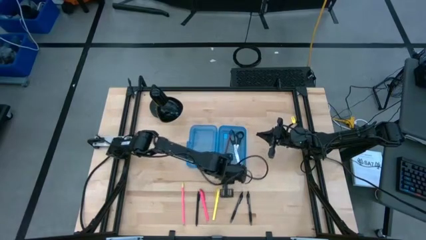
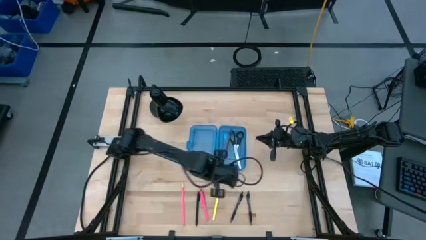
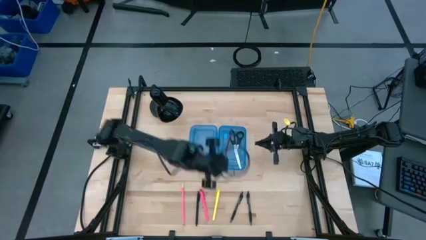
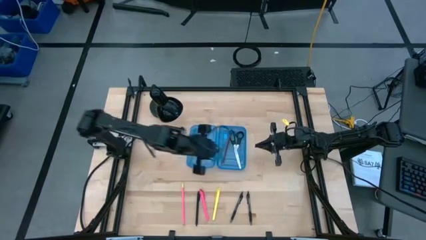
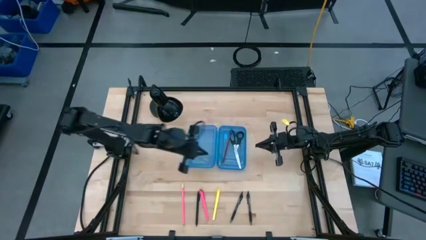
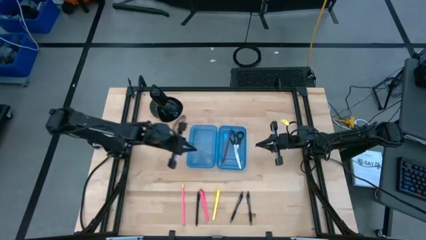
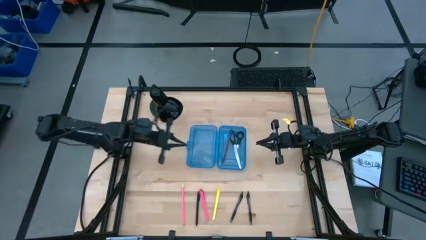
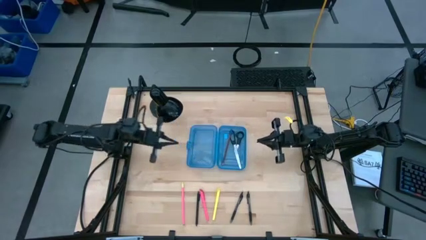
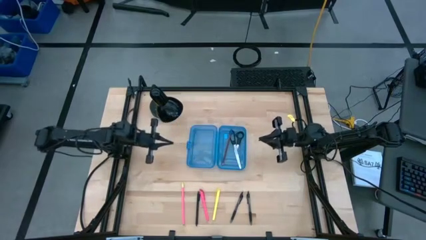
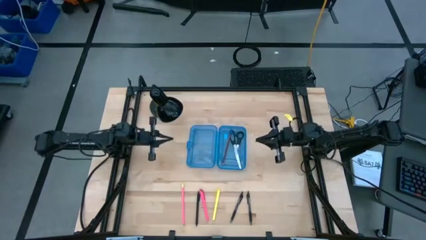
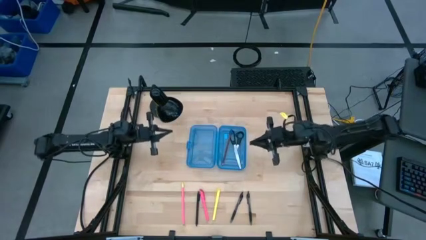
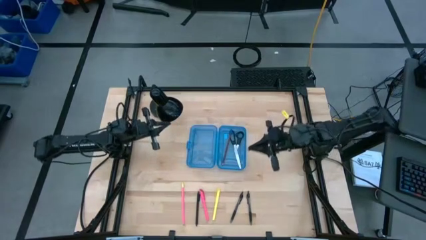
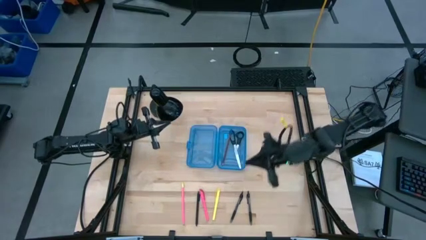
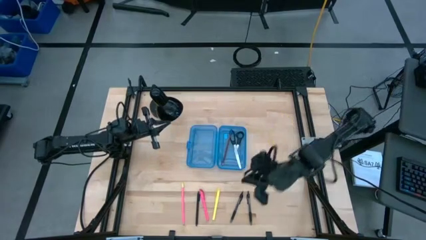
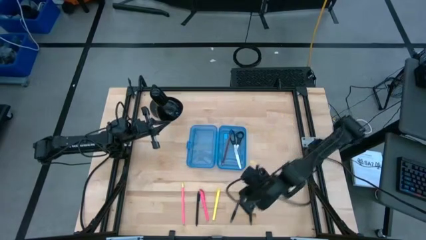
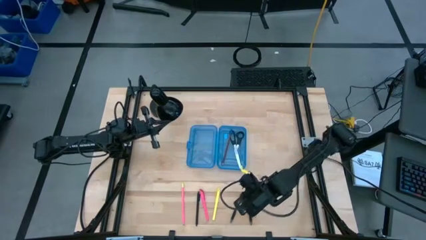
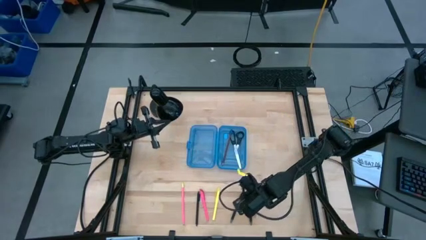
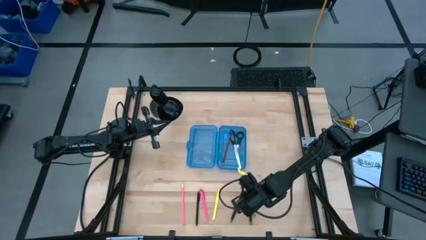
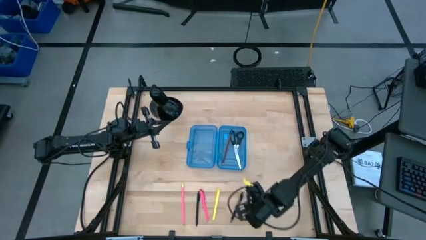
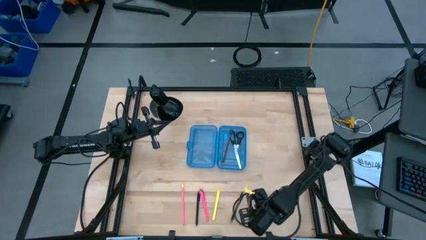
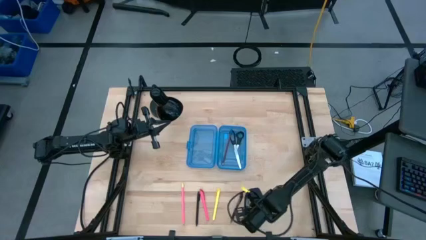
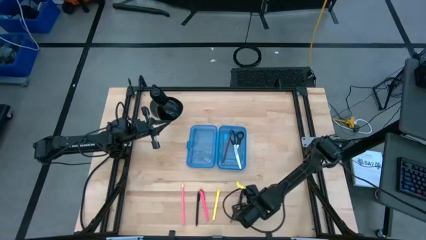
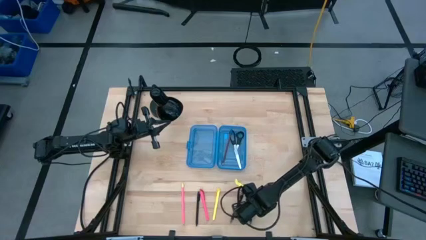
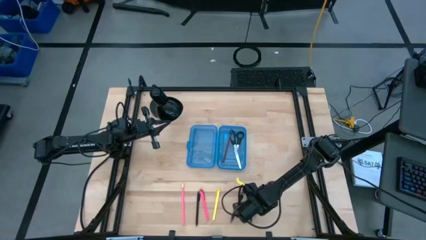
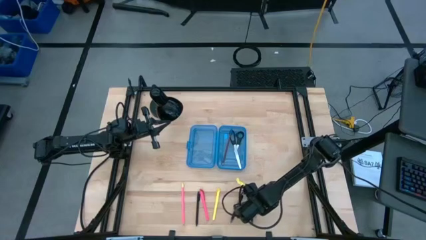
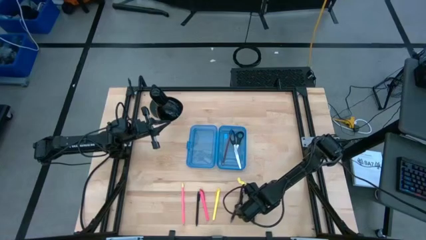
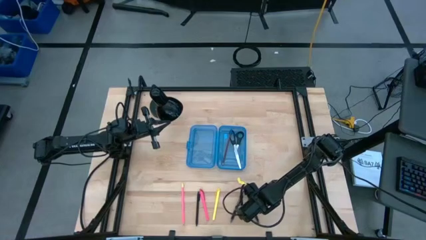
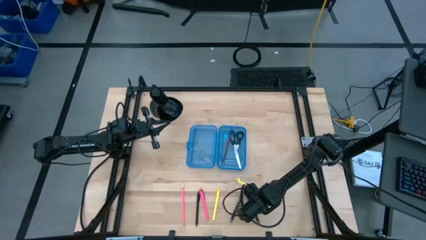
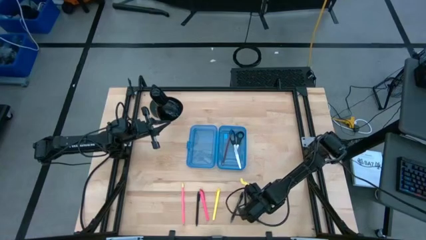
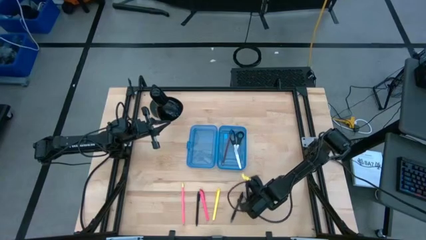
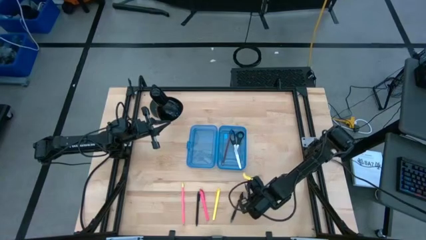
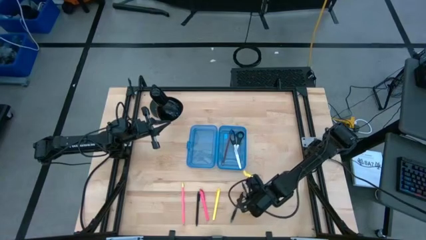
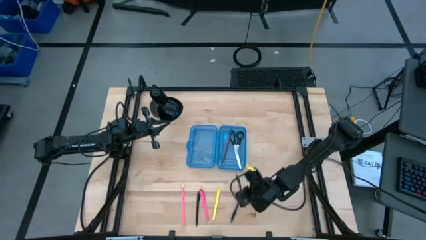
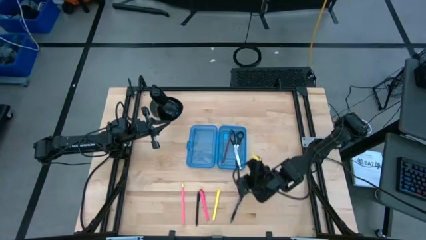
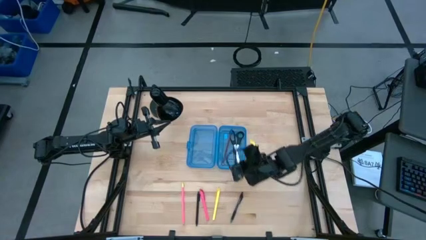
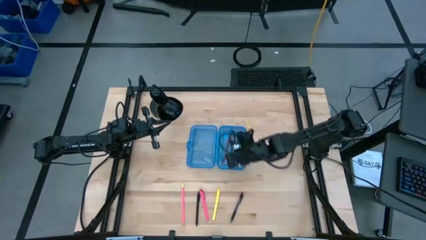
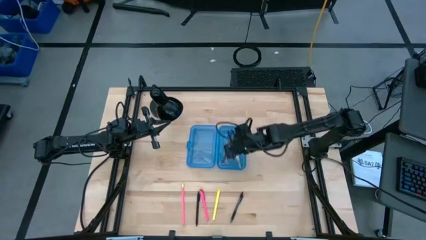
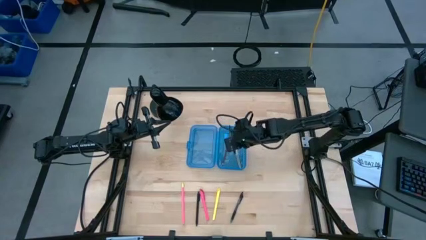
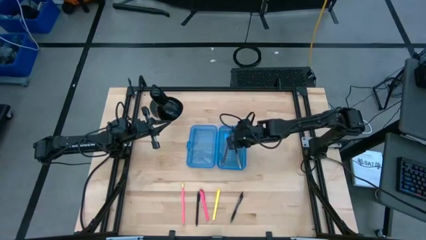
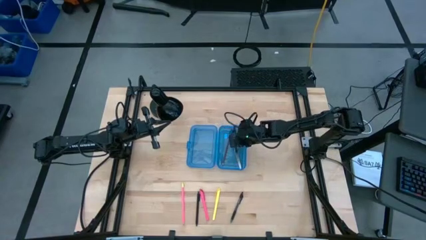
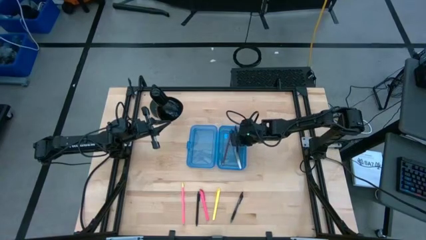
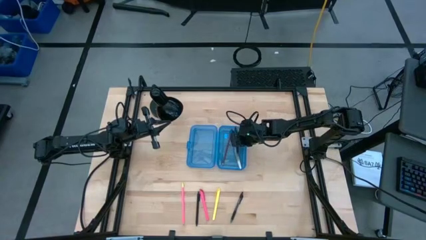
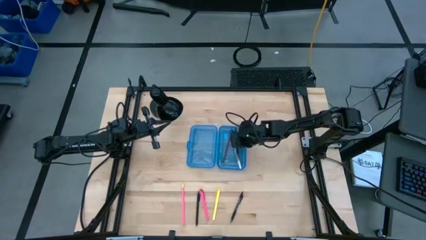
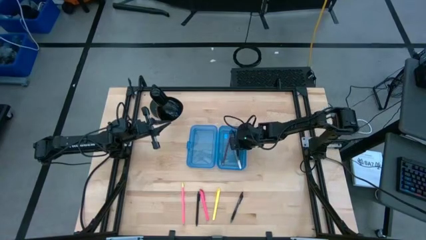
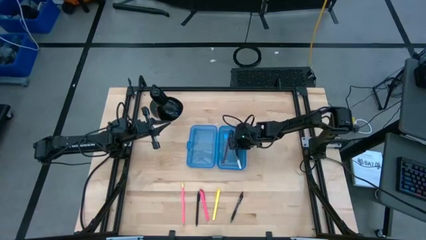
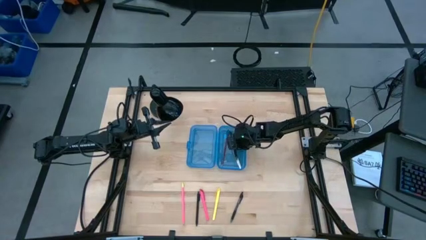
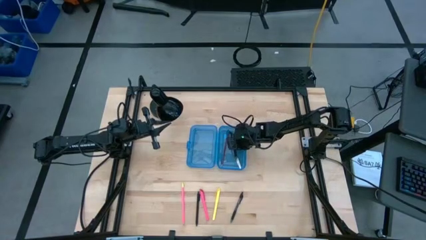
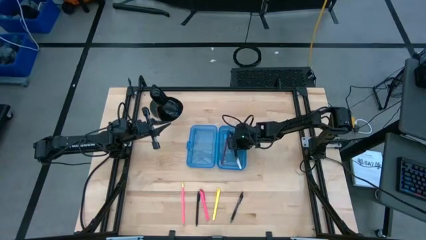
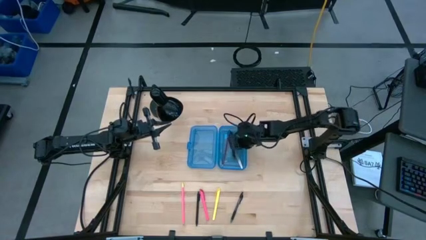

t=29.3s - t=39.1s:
Task: Pick & place school supplies into a supply box
Put the right black pen into the supply box

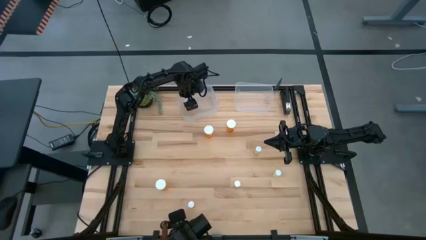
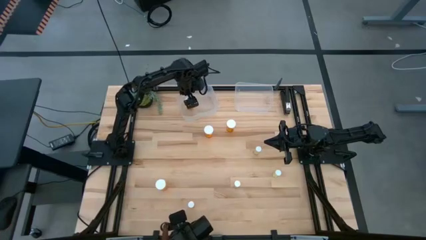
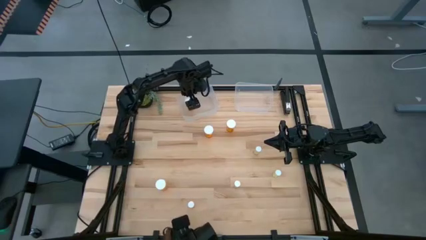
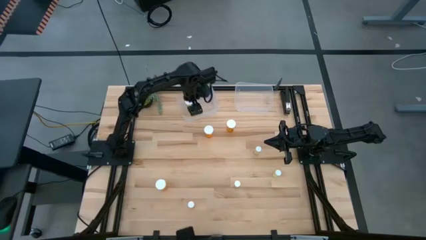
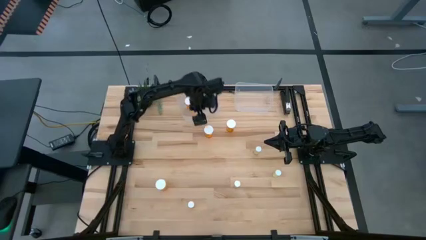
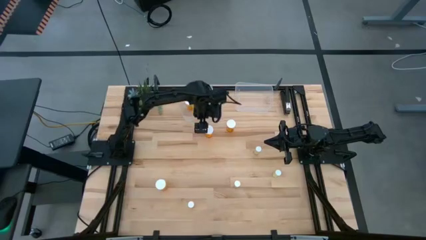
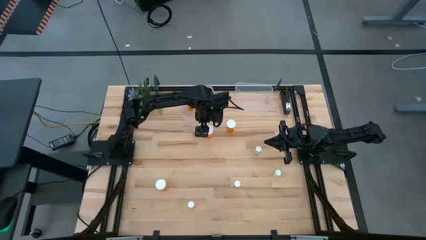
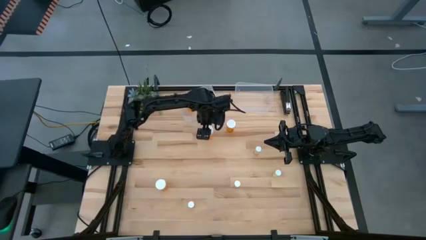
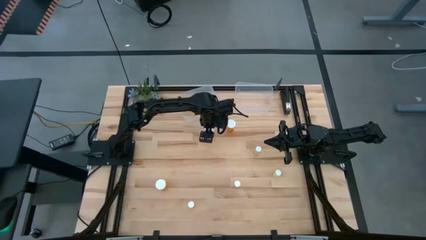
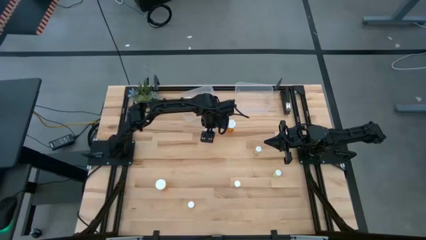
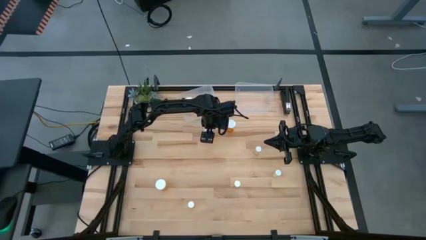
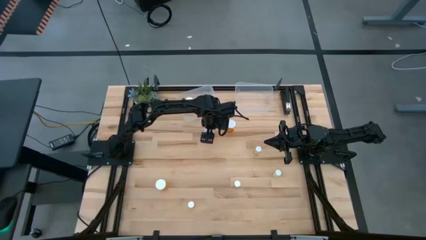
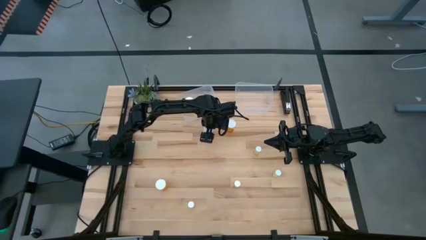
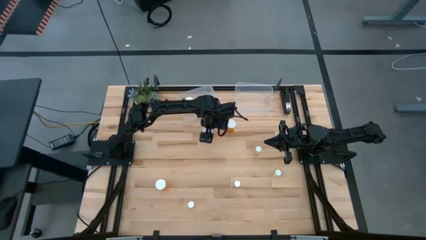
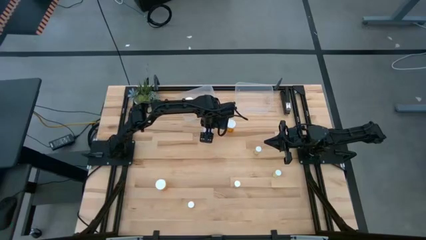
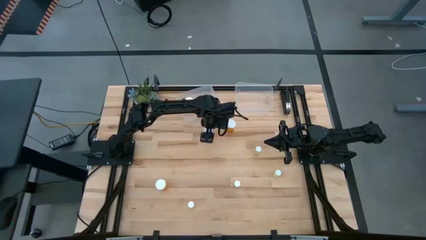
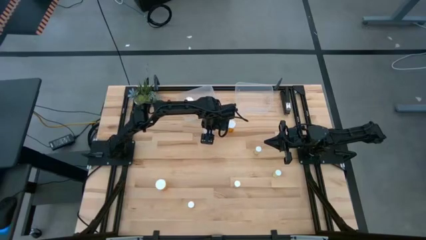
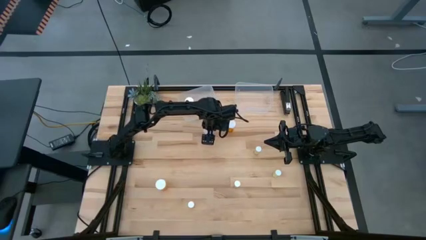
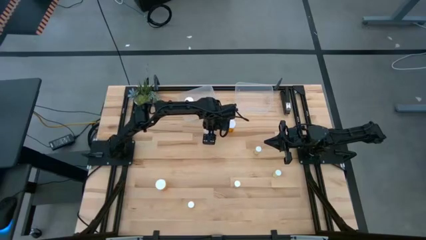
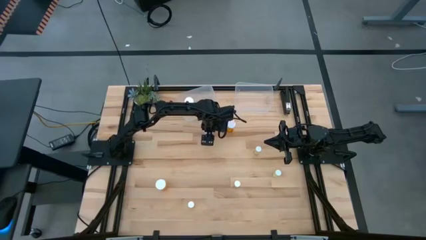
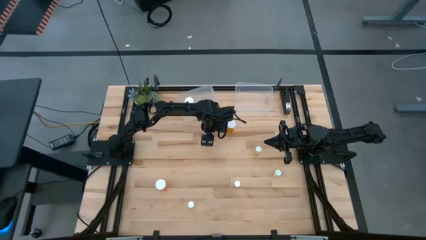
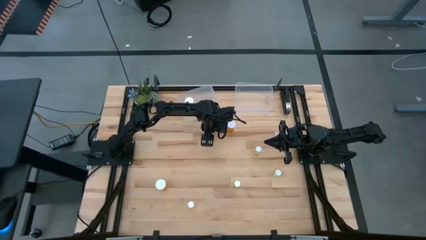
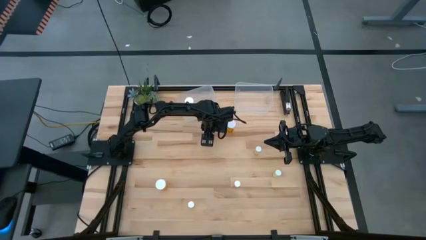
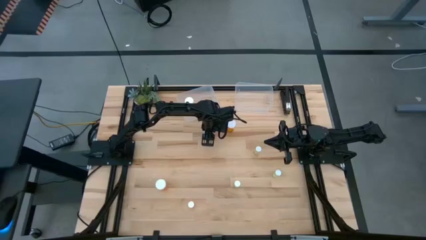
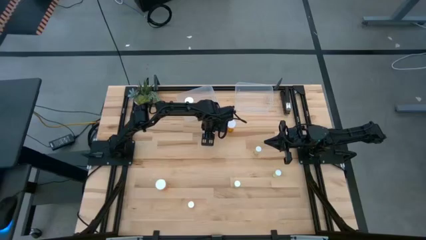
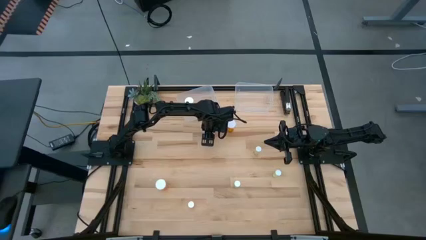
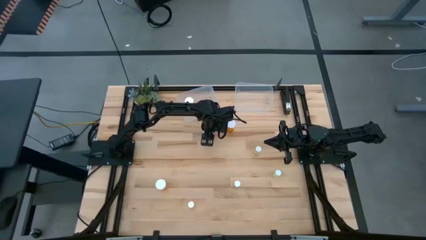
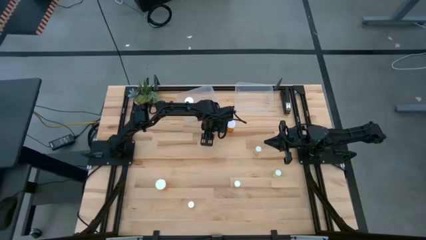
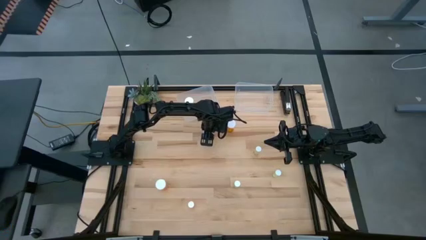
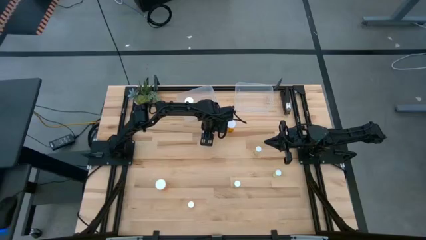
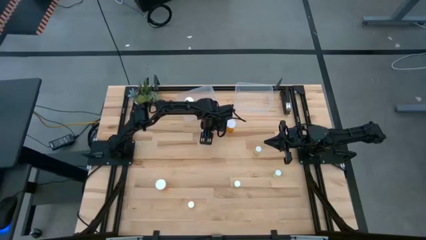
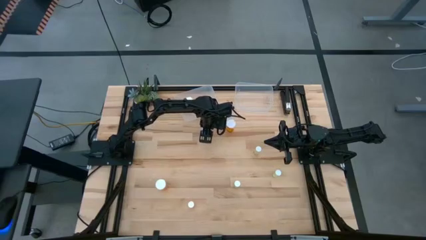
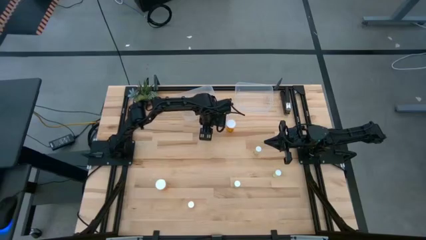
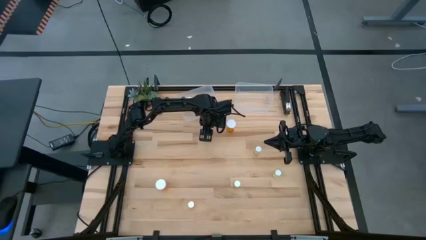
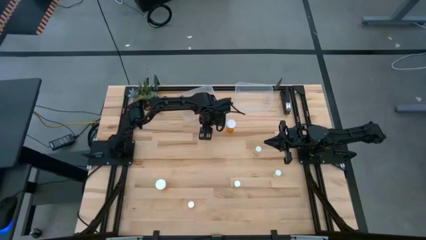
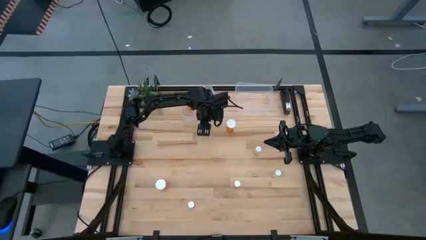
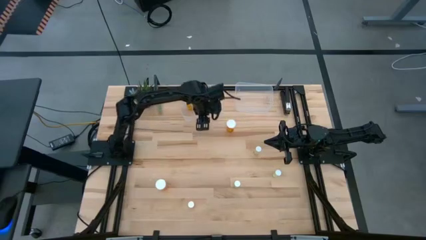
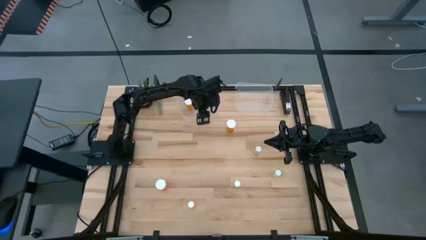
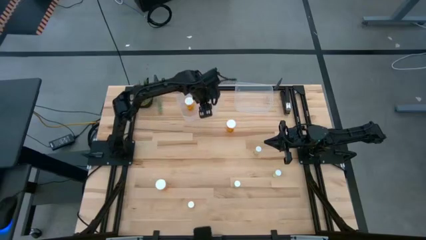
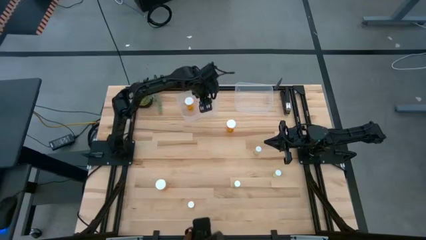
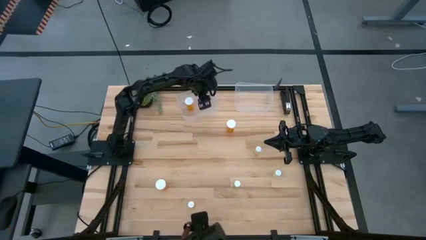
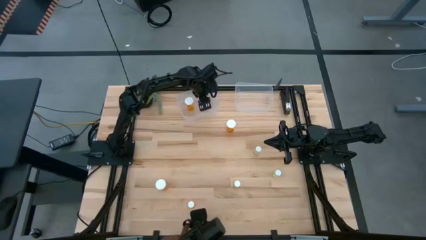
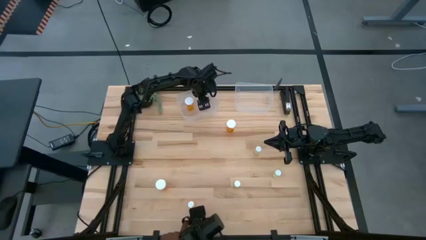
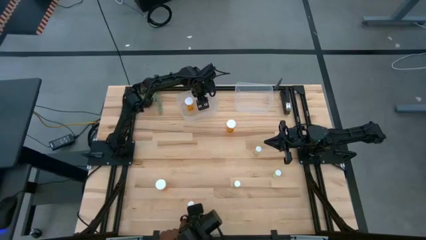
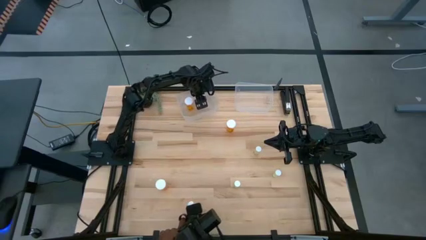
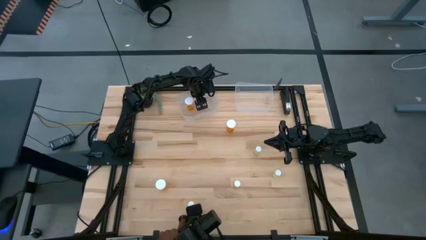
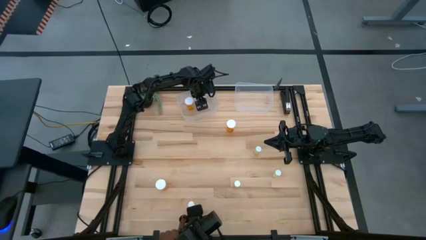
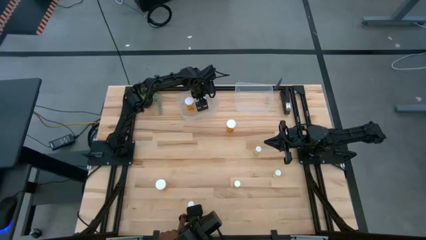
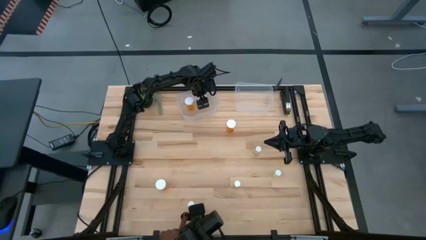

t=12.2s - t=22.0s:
Task: Pick and place medicine bottles into bin by pill shape (circle, oval)
Put the orange capsule bottle into the left transparent bin
